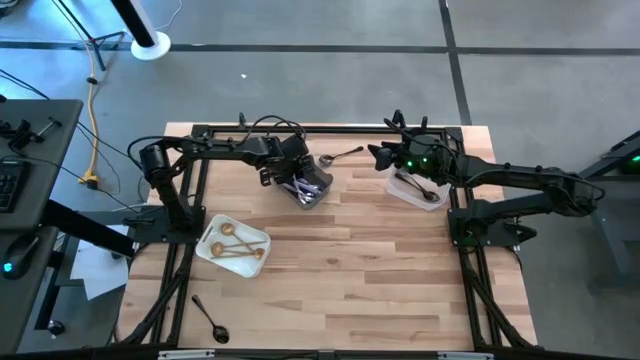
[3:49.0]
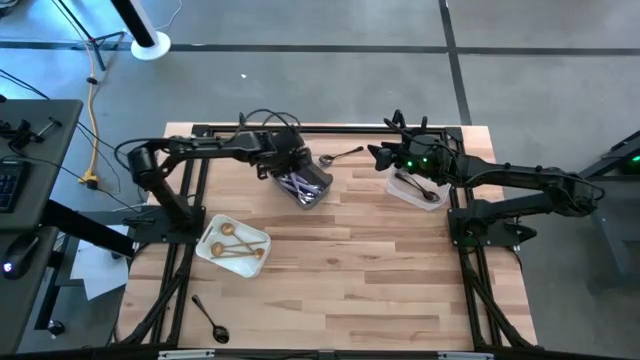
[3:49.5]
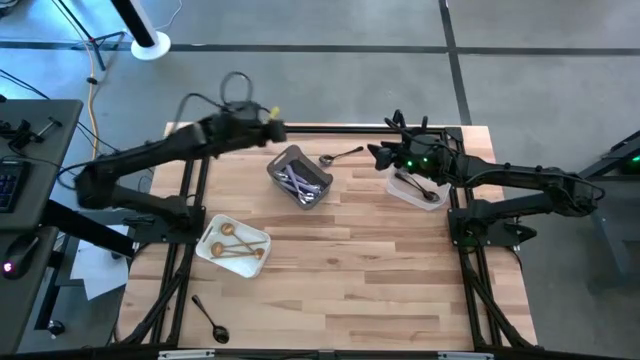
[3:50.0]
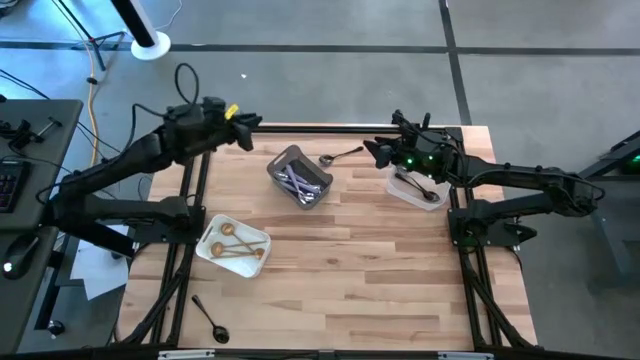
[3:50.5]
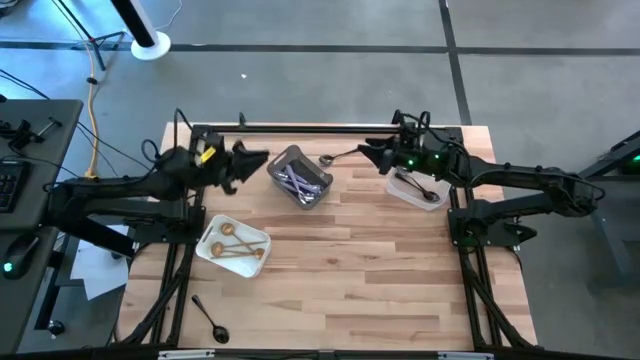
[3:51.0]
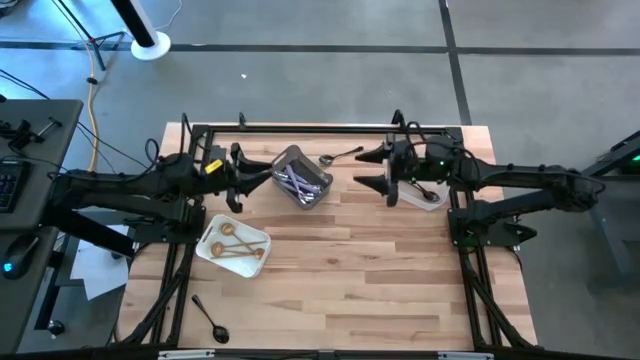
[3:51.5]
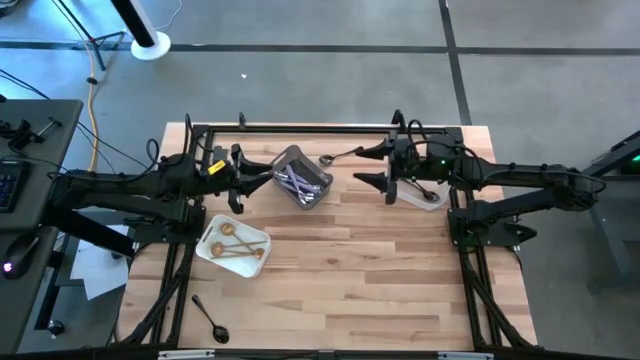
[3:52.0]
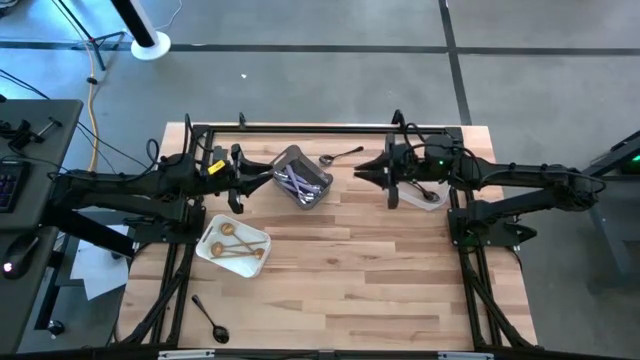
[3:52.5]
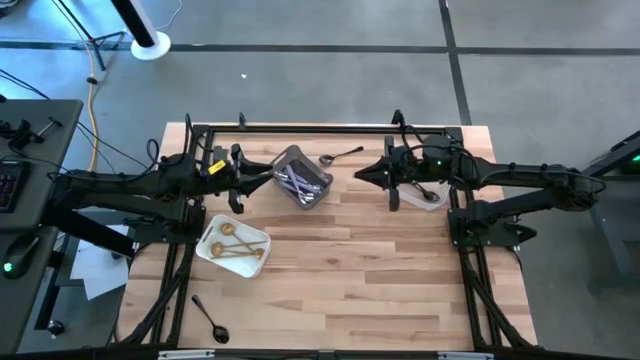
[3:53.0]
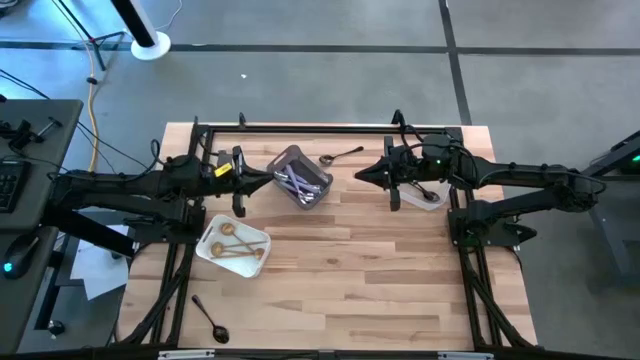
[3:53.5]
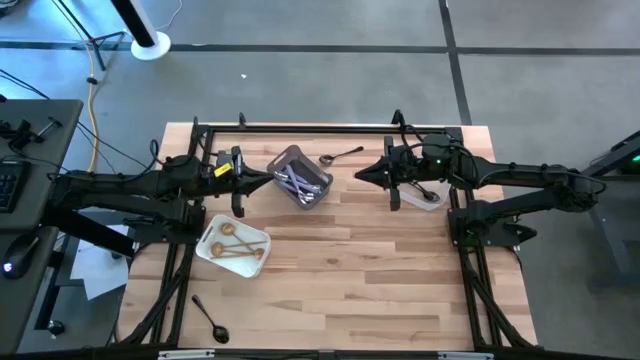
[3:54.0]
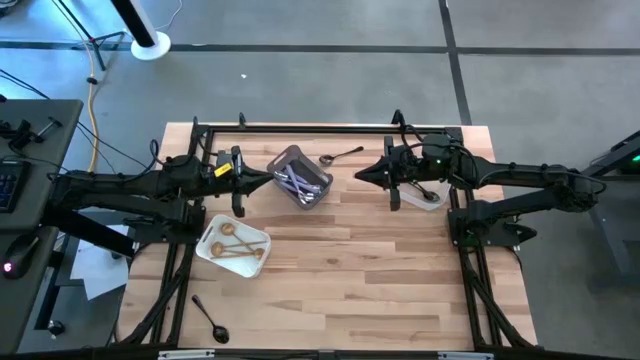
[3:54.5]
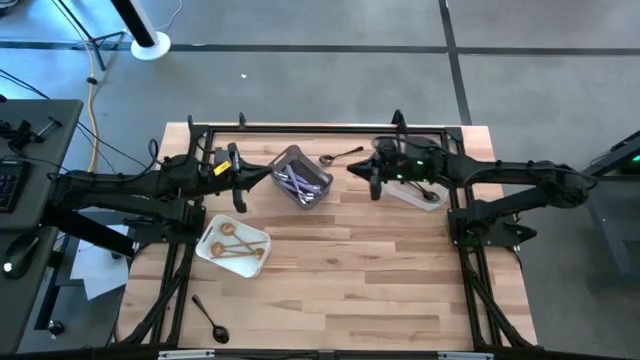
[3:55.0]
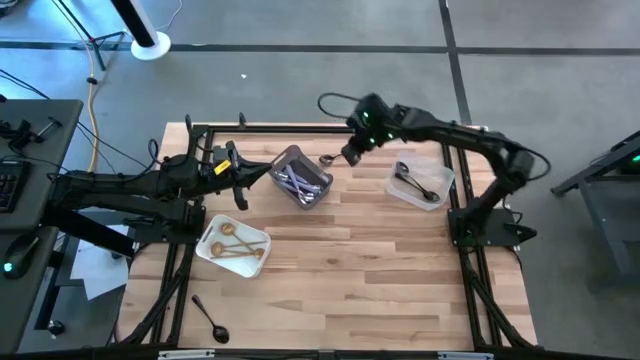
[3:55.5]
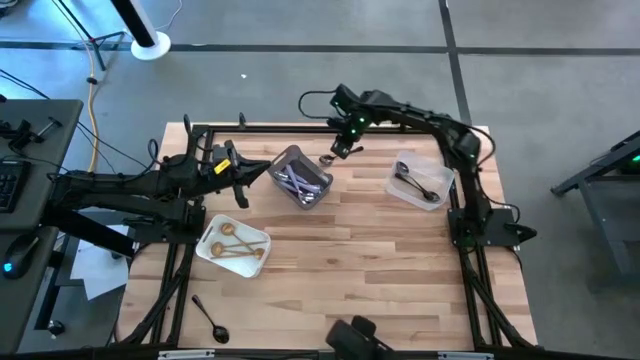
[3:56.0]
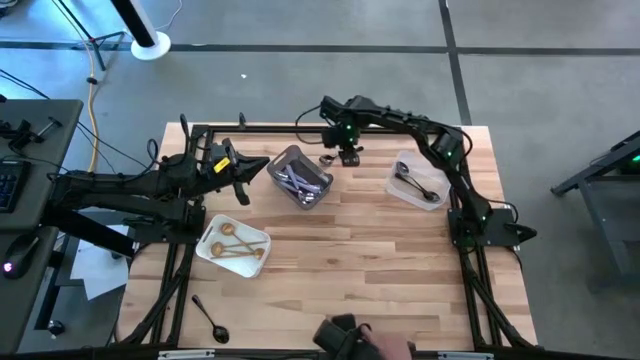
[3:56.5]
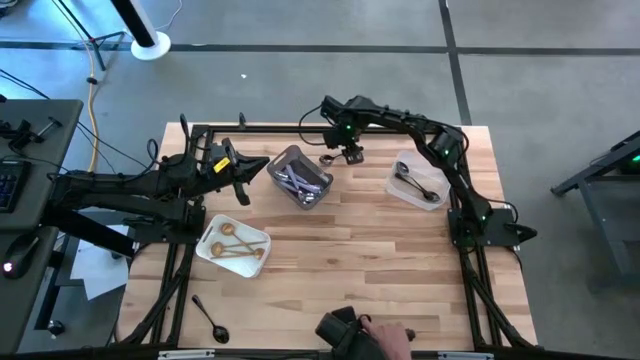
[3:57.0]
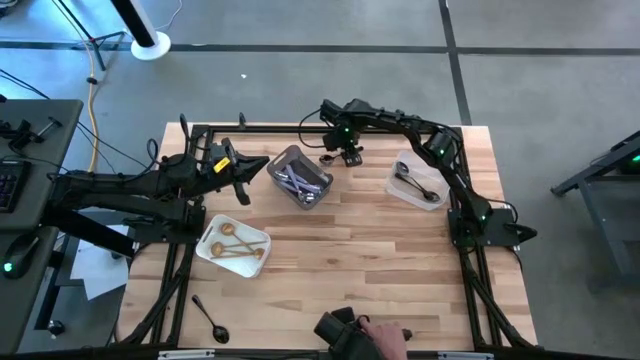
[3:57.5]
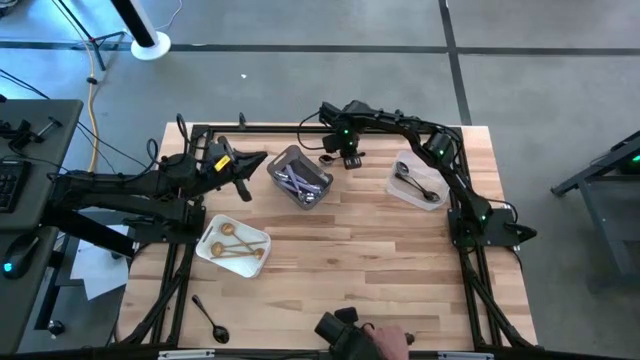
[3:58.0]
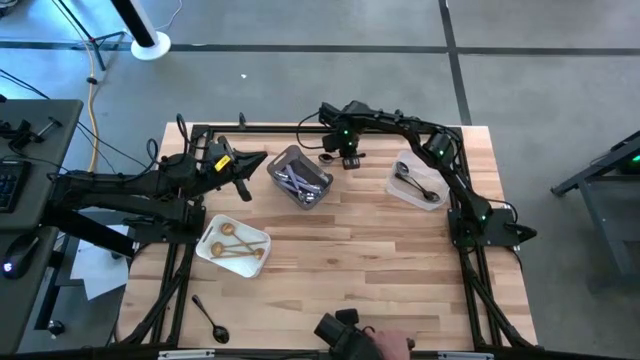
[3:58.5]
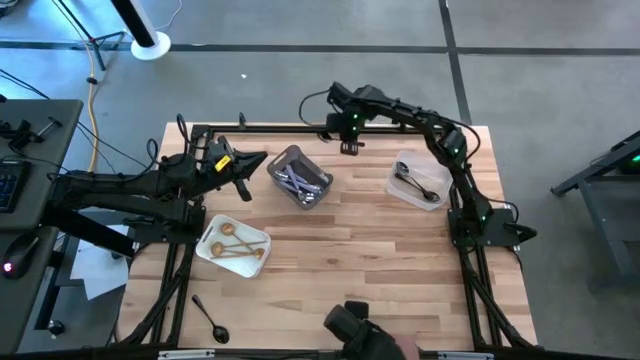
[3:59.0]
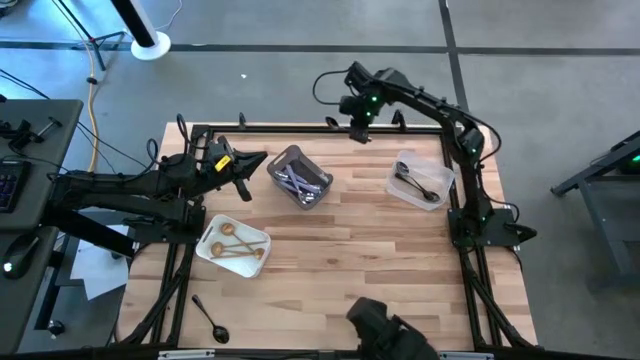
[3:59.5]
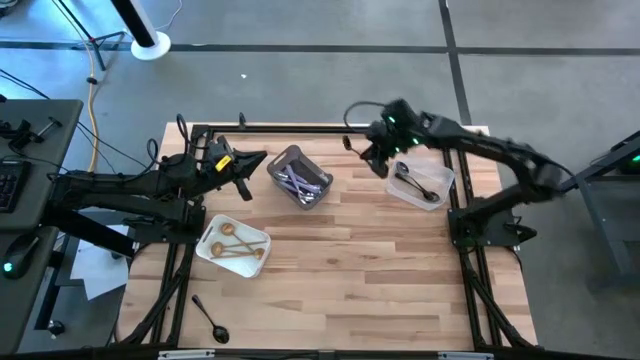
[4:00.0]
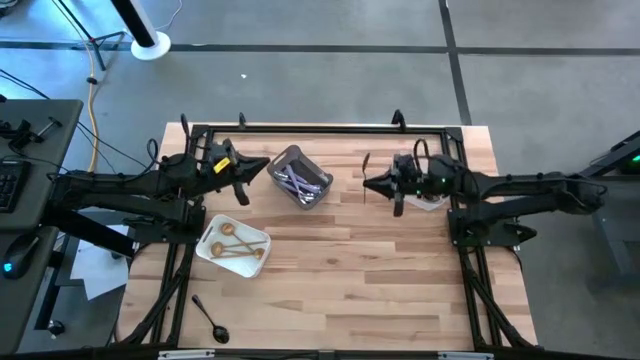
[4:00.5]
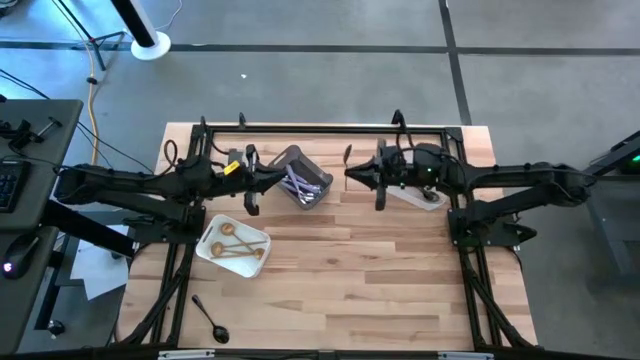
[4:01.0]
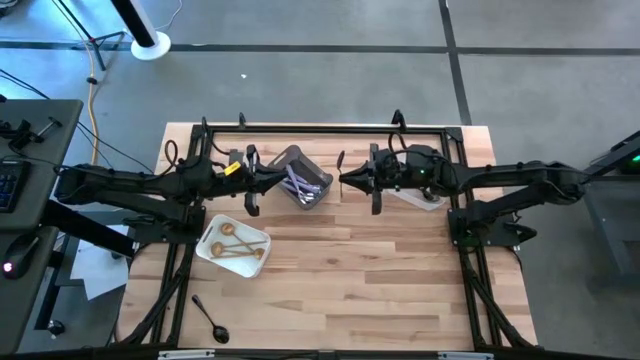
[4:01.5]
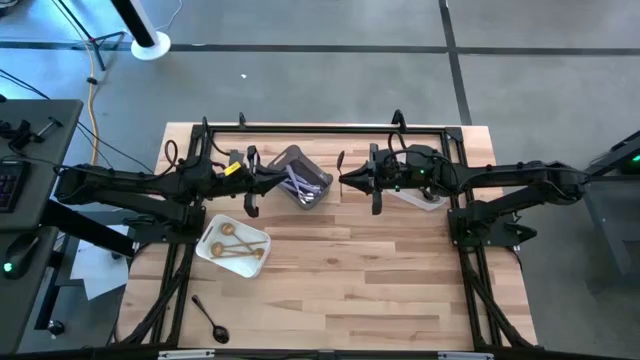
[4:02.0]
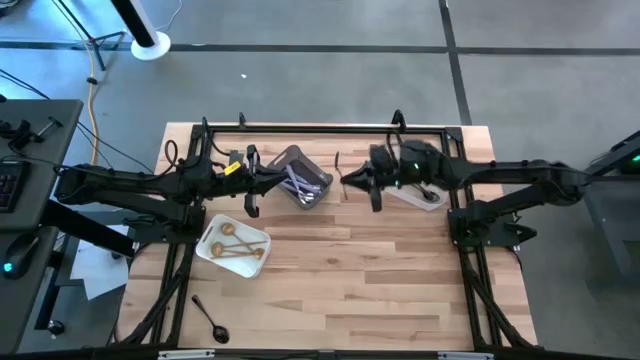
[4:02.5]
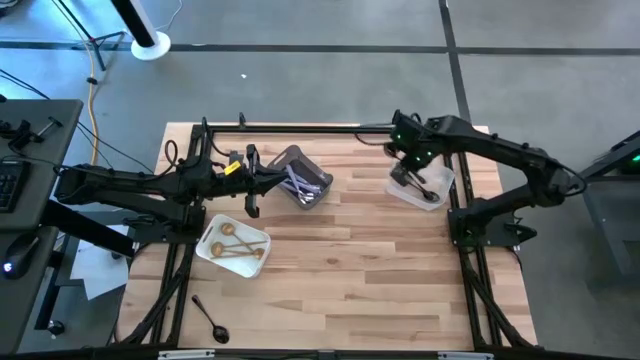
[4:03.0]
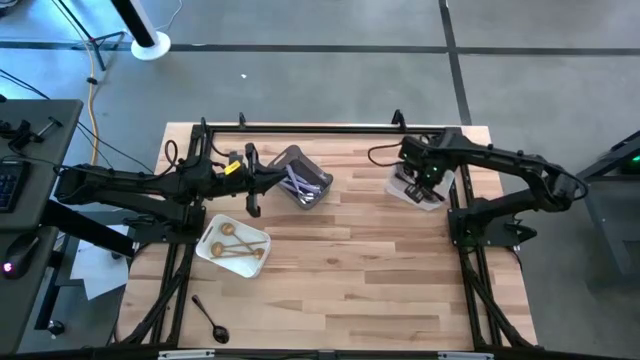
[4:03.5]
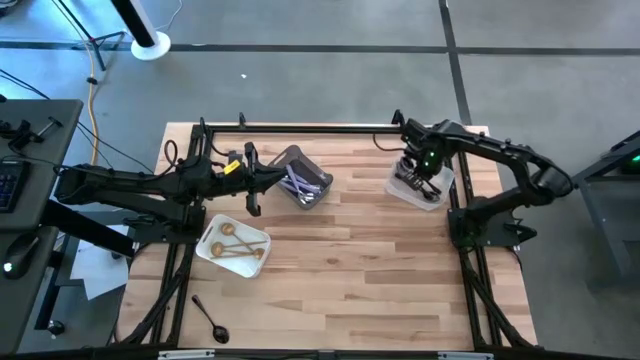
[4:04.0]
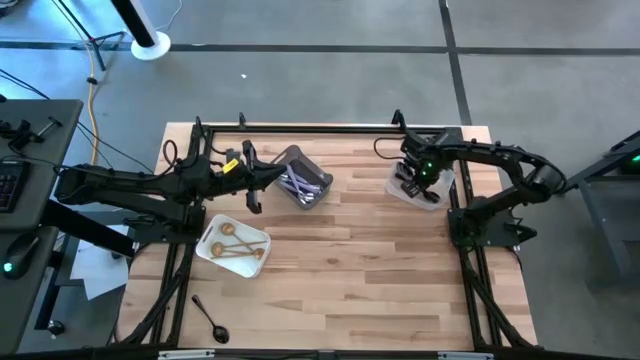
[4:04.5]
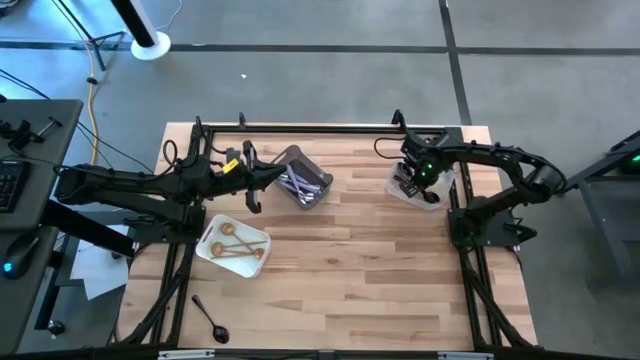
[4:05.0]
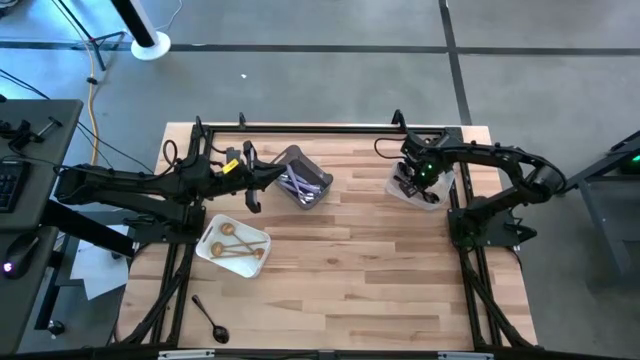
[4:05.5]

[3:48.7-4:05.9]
Task: Sort silverware by color (type)
Put the top black spoon into the transparent bin

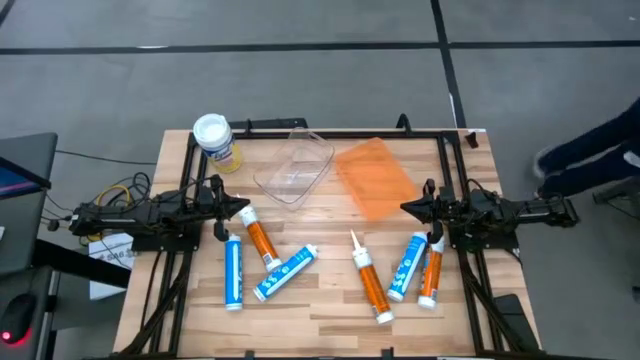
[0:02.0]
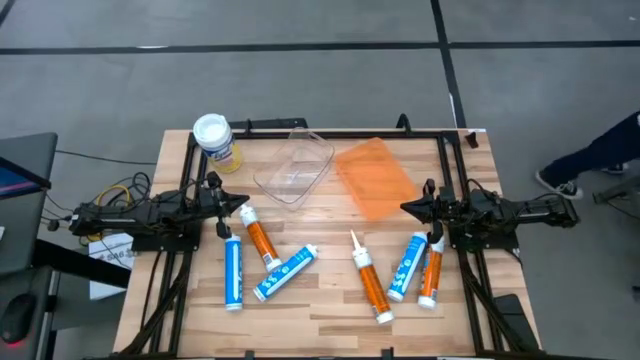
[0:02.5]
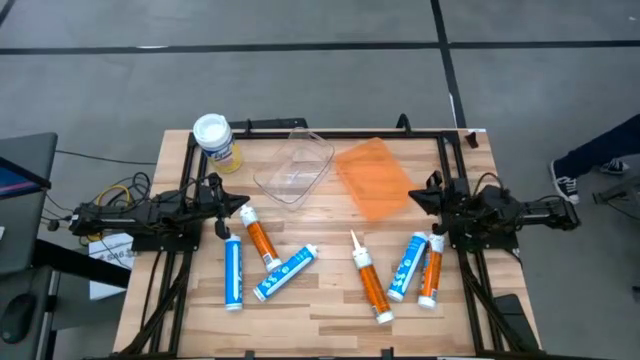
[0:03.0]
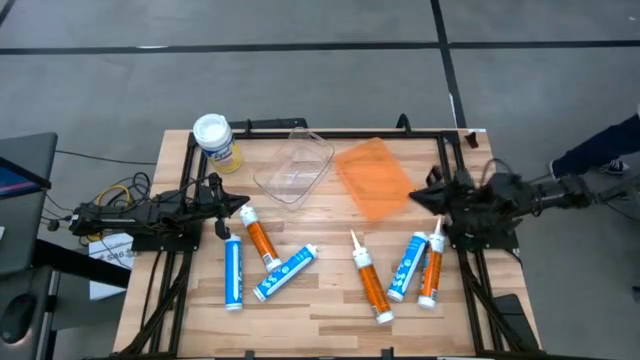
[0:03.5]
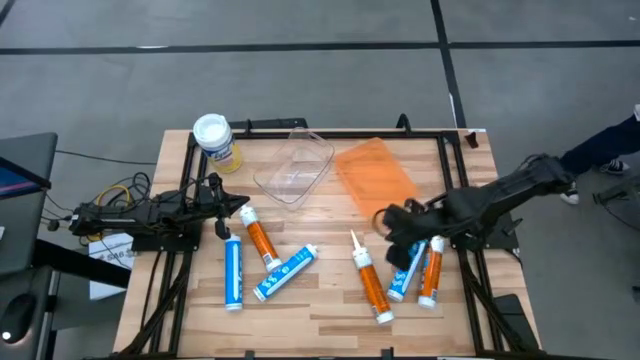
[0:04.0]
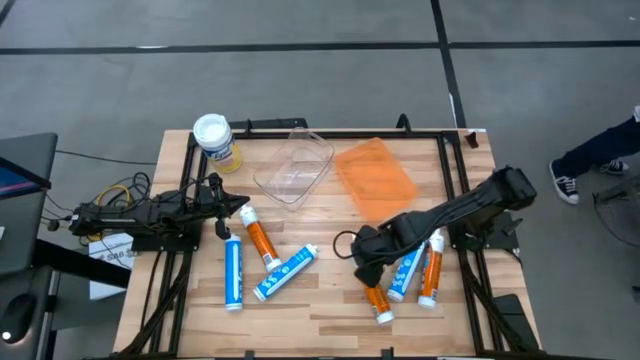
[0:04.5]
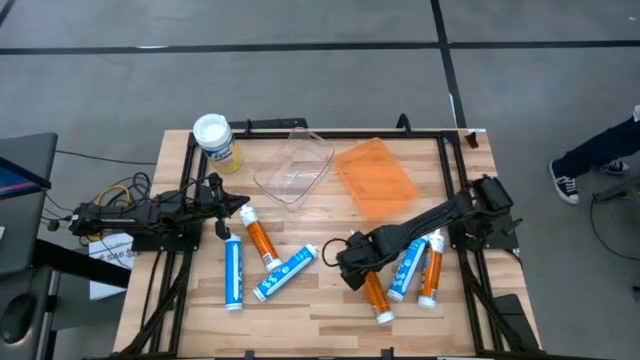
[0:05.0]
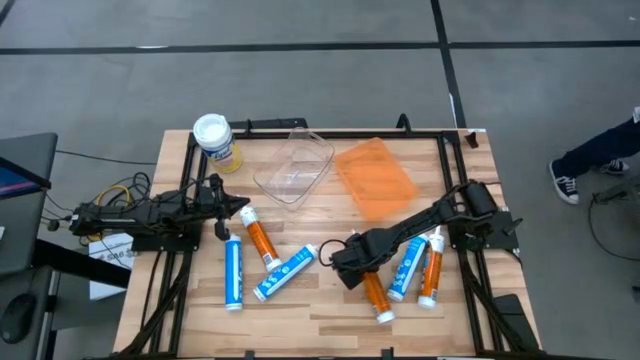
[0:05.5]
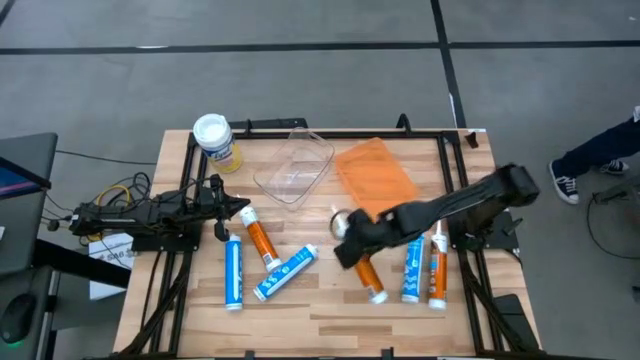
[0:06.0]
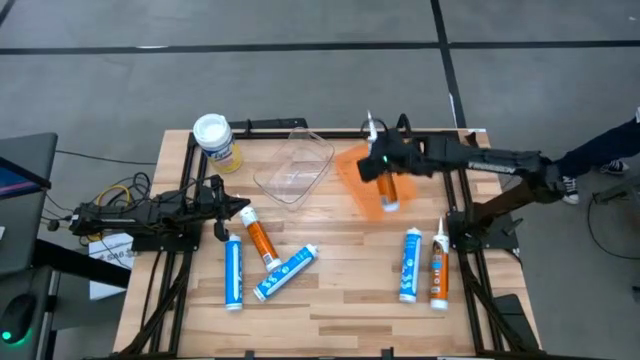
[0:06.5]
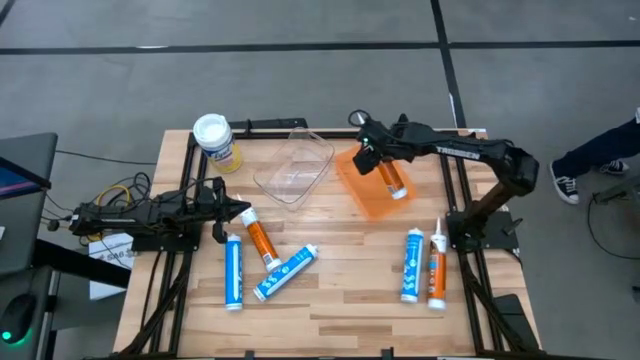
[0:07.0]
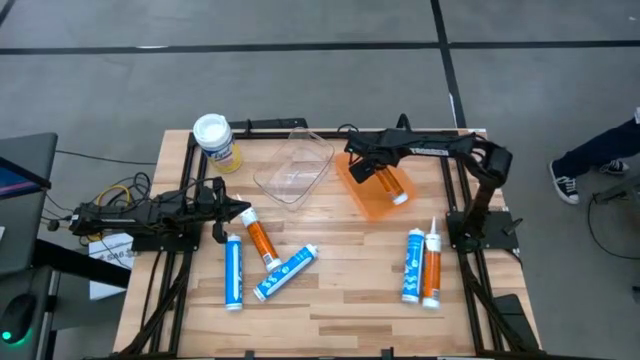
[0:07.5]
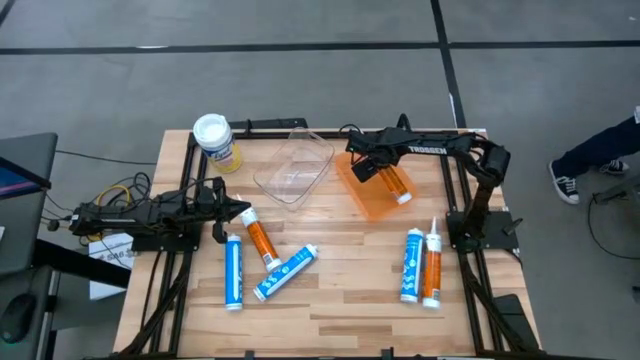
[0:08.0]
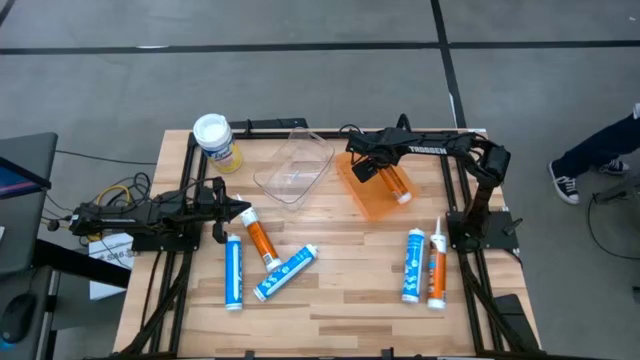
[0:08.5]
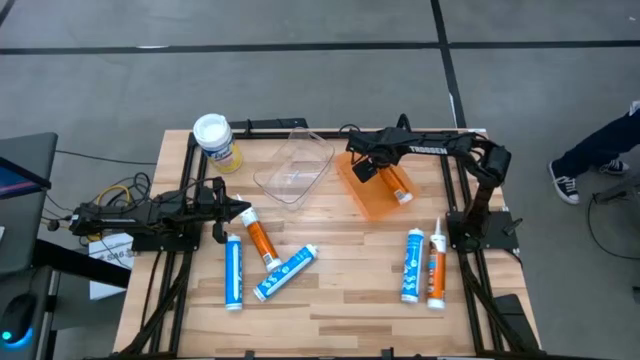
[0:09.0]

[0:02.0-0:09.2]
Task: Pick & place silicon tubes, Sealant and Lysol wipes
Put the middle orange sealant into the orange bin
